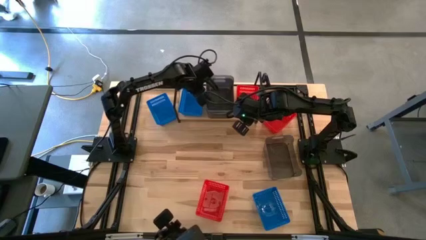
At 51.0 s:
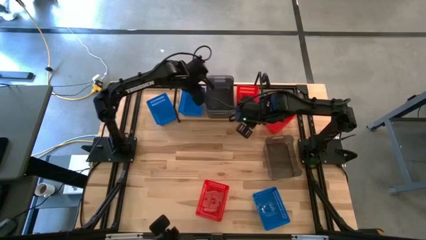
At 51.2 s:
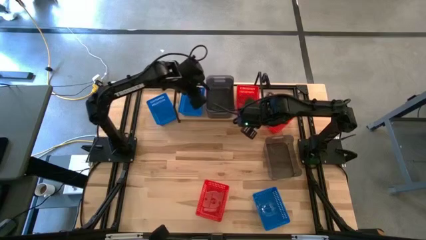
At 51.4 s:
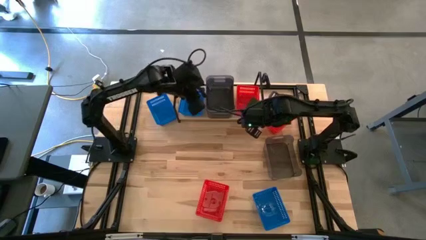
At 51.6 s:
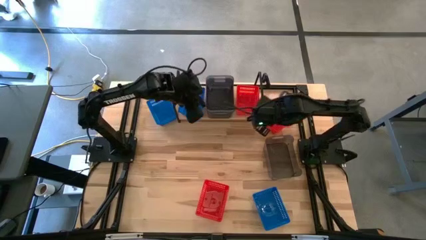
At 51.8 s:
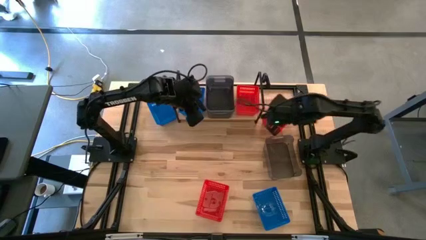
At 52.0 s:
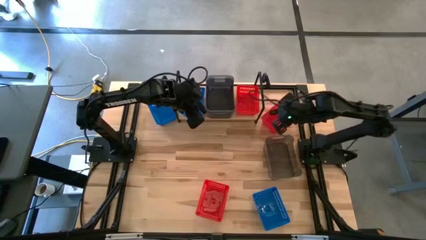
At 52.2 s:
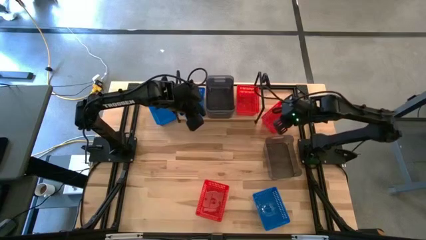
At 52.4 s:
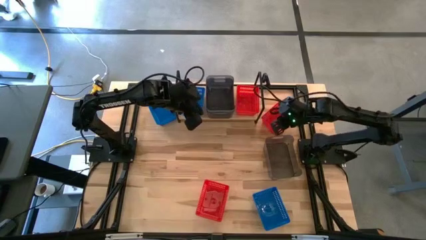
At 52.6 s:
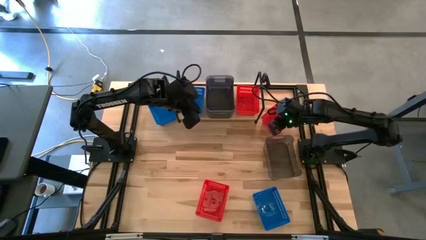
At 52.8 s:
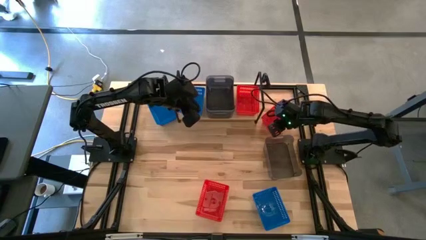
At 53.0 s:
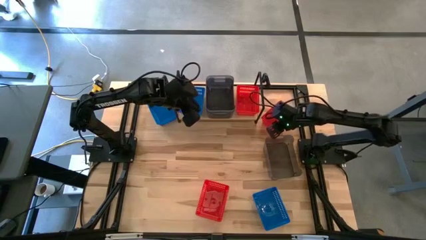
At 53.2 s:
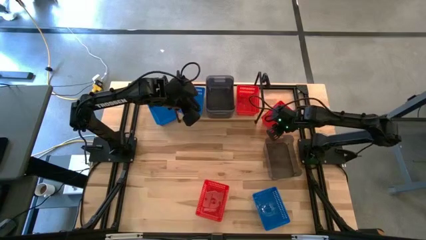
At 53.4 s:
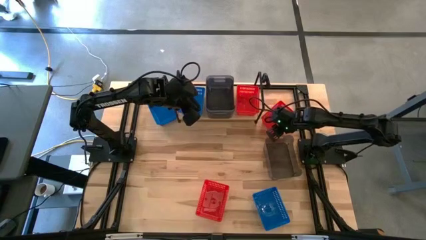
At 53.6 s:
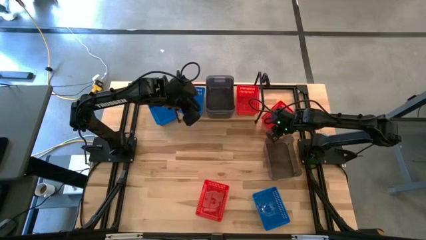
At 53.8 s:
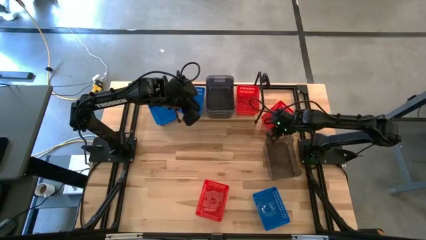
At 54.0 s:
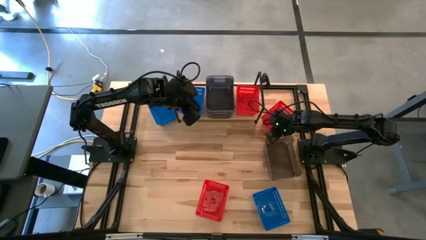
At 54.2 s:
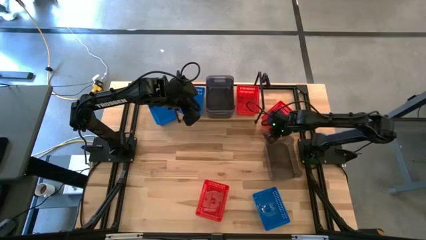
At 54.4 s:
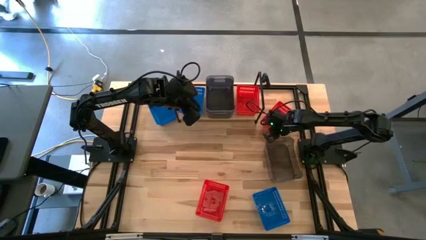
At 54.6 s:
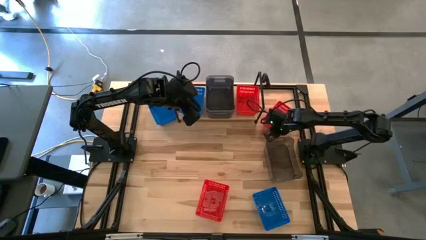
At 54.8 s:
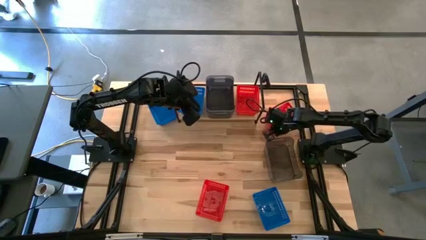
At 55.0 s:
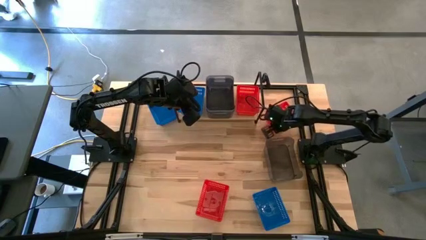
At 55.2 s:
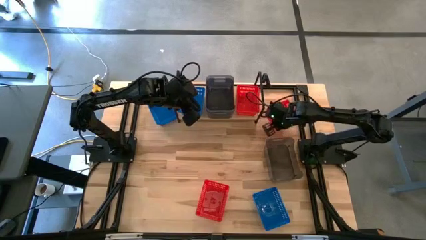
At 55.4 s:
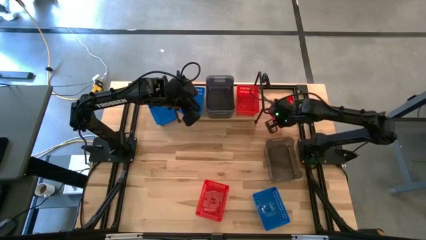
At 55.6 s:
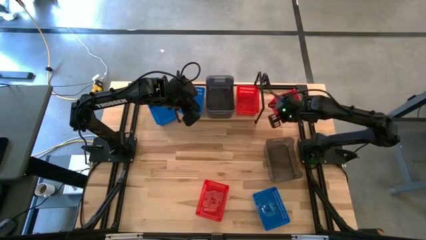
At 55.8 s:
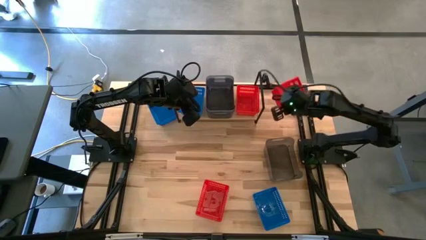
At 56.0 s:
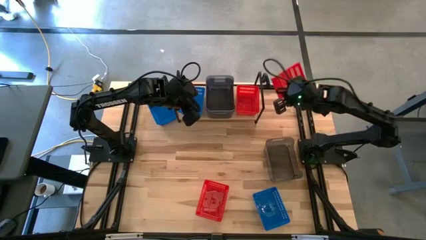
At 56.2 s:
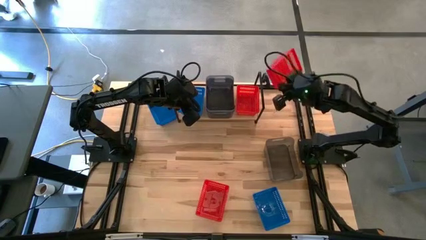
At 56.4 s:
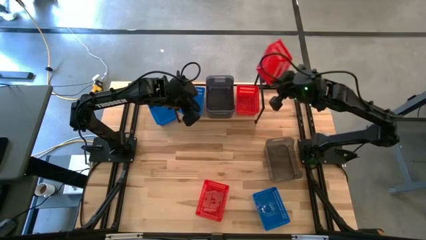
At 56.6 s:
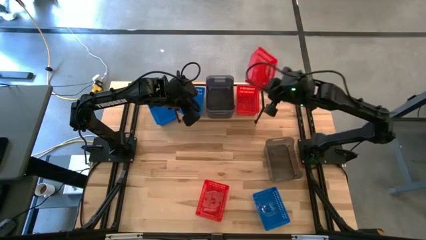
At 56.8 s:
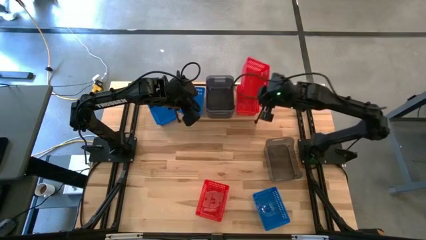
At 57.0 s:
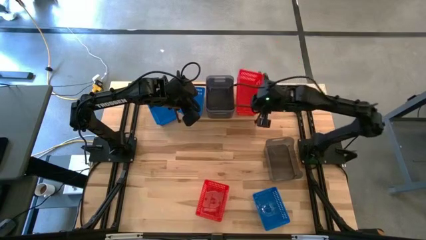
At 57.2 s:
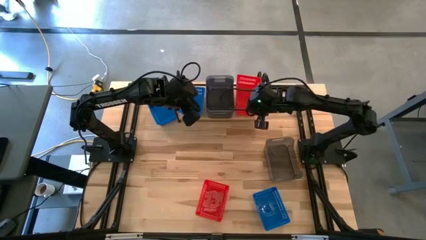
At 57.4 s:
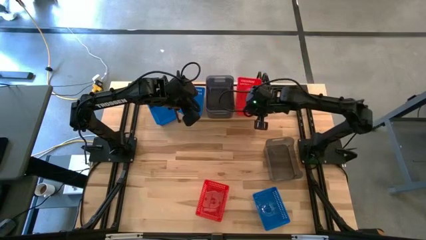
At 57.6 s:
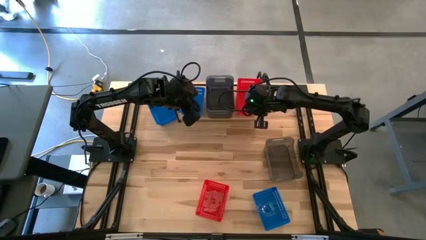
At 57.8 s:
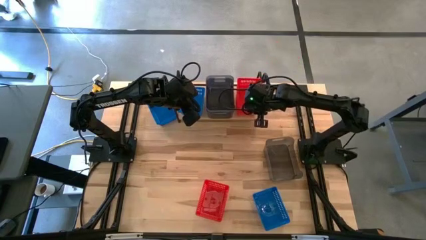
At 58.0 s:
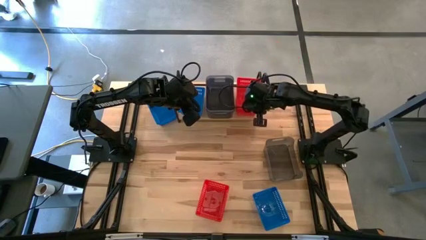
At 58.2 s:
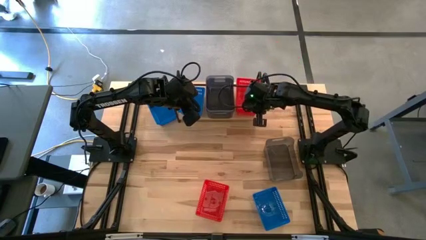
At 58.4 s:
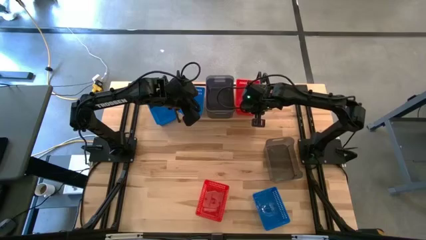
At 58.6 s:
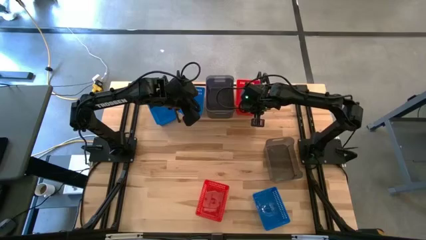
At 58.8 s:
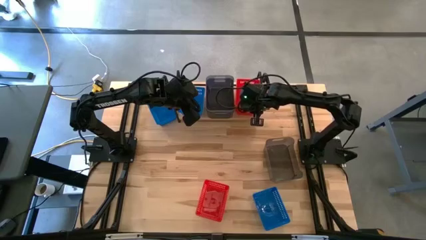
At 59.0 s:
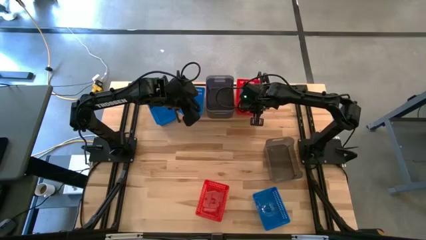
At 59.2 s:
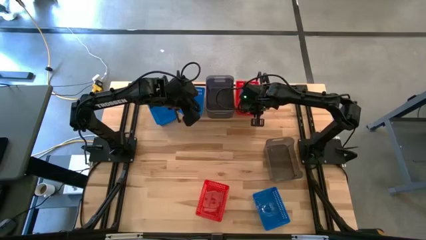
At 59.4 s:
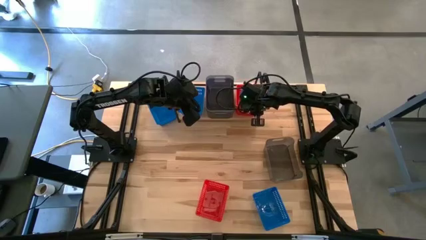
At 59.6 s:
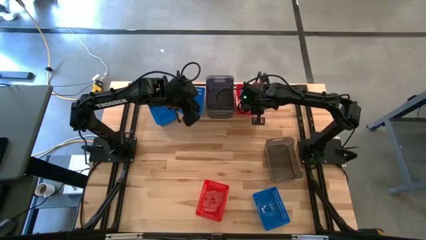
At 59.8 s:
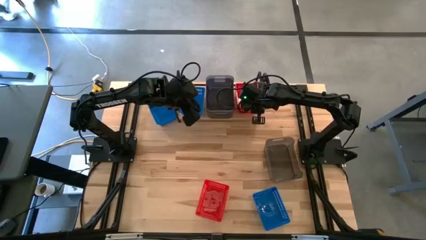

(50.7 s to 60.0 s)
Task: Stack baskets on shelf by color
Stack the top red bin on the red bin on the shelf
